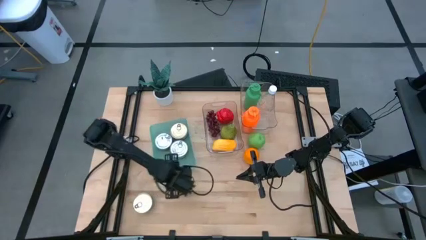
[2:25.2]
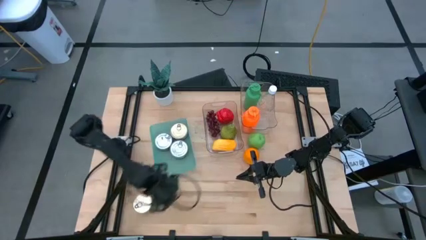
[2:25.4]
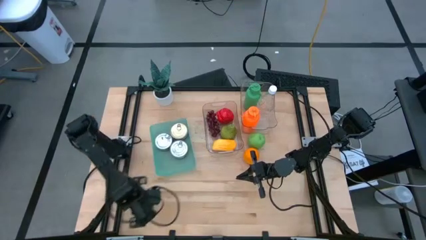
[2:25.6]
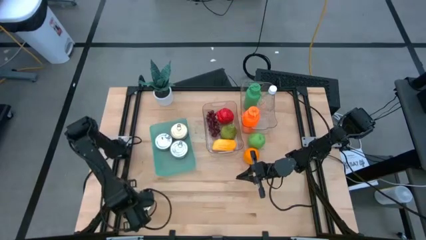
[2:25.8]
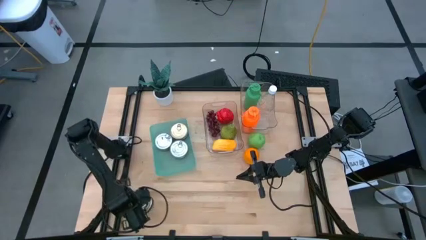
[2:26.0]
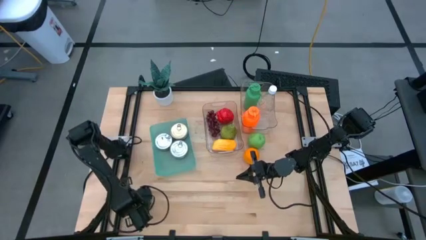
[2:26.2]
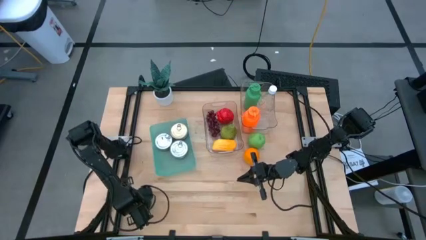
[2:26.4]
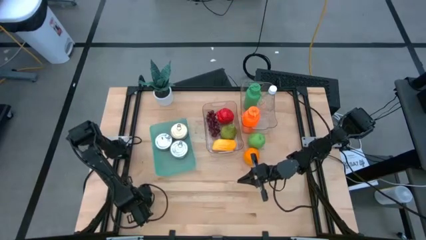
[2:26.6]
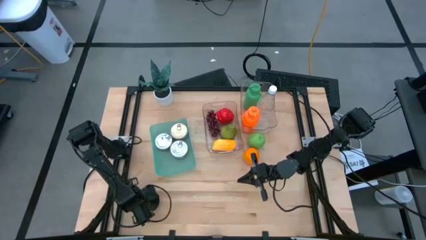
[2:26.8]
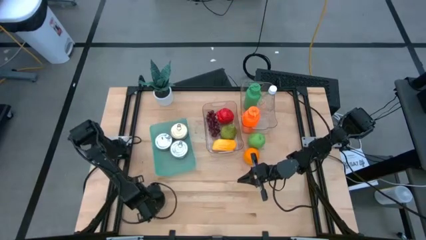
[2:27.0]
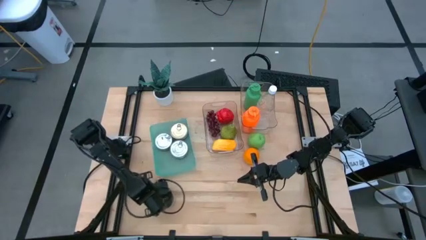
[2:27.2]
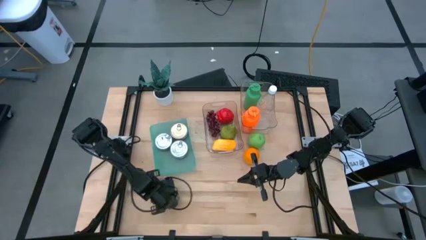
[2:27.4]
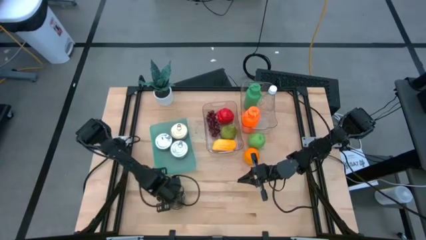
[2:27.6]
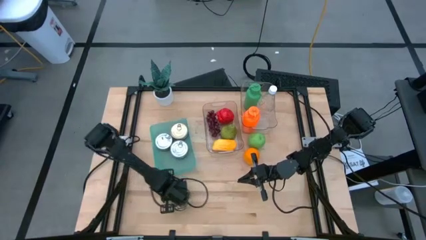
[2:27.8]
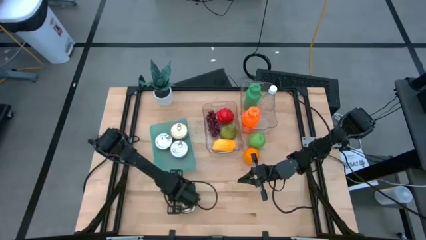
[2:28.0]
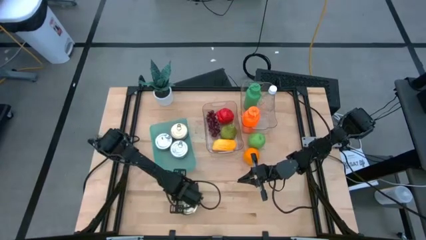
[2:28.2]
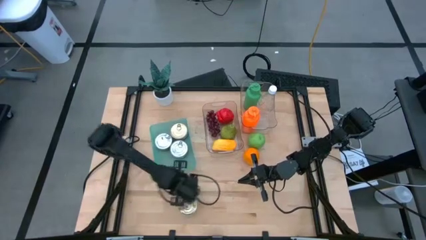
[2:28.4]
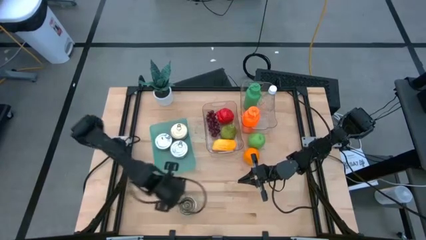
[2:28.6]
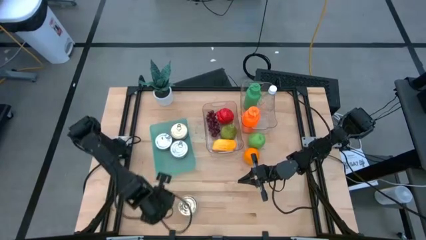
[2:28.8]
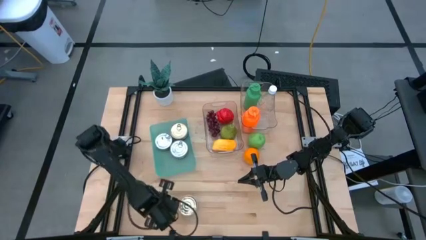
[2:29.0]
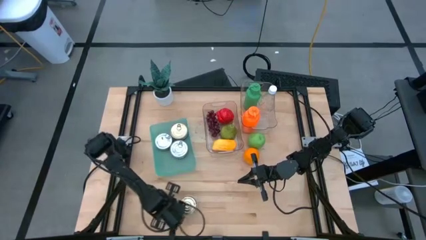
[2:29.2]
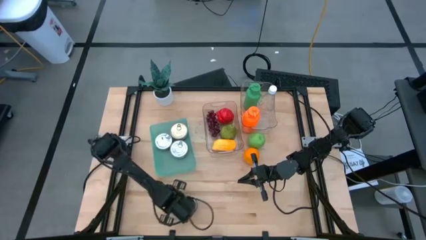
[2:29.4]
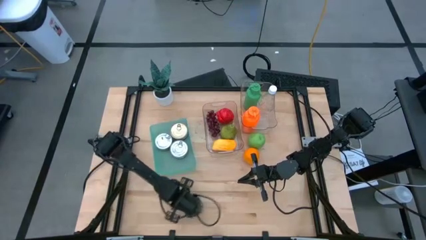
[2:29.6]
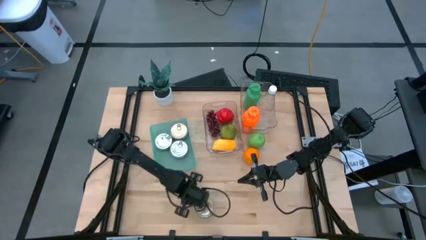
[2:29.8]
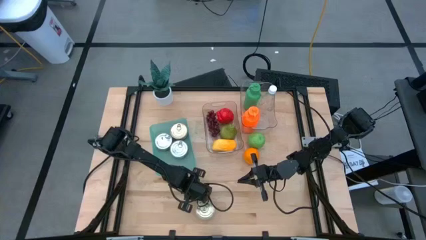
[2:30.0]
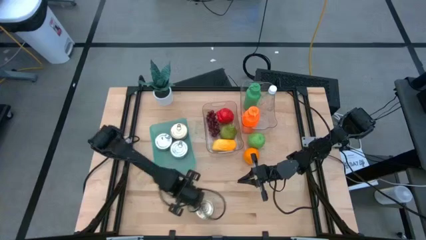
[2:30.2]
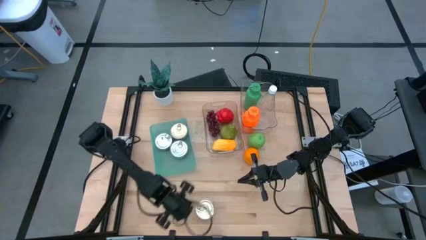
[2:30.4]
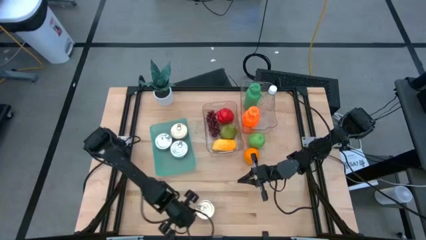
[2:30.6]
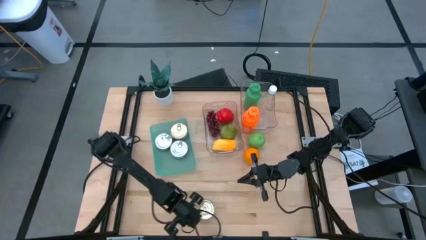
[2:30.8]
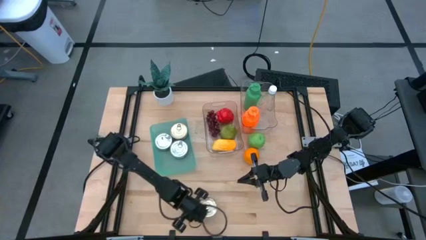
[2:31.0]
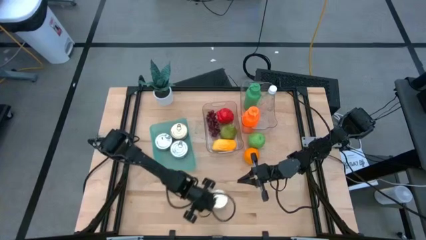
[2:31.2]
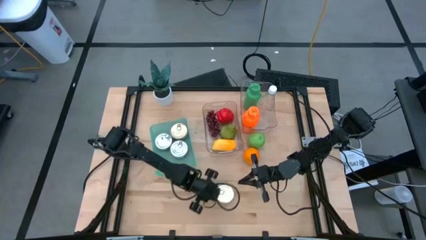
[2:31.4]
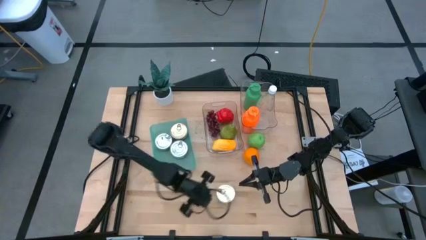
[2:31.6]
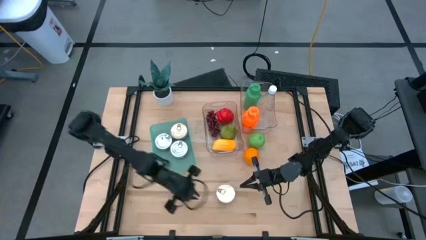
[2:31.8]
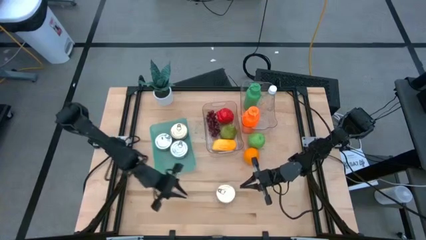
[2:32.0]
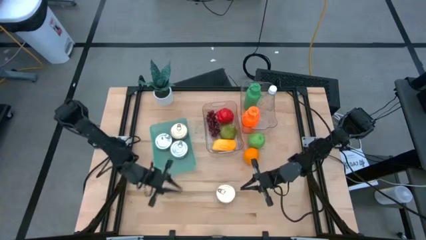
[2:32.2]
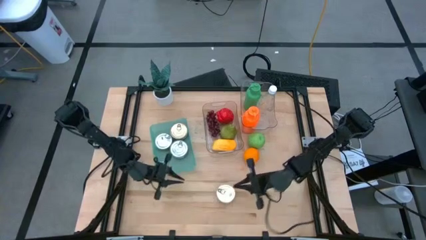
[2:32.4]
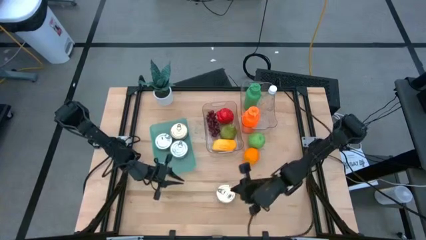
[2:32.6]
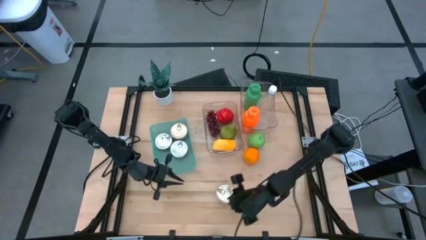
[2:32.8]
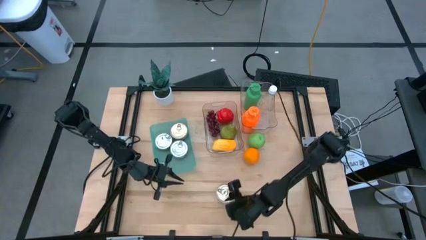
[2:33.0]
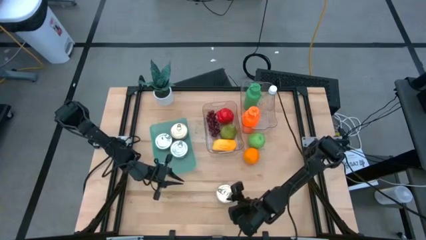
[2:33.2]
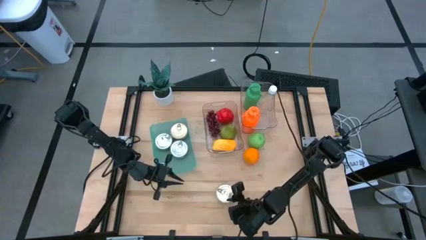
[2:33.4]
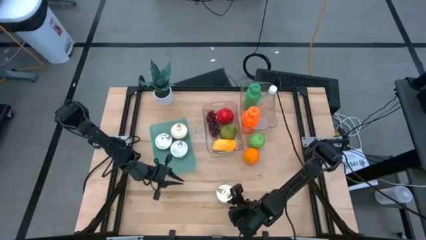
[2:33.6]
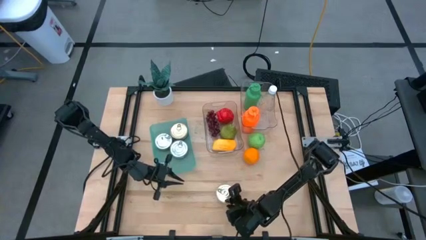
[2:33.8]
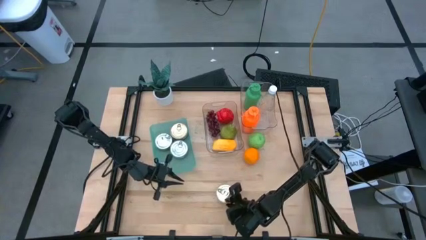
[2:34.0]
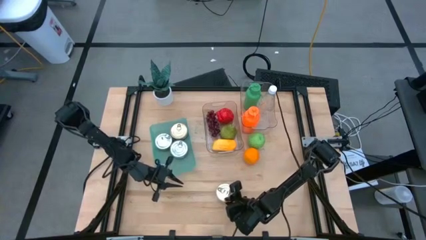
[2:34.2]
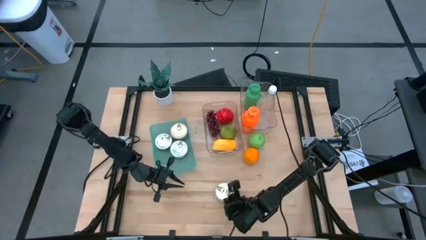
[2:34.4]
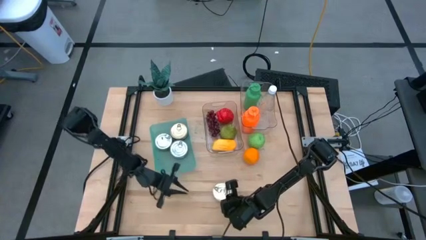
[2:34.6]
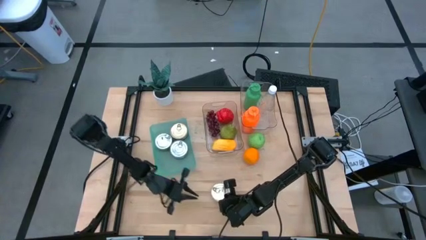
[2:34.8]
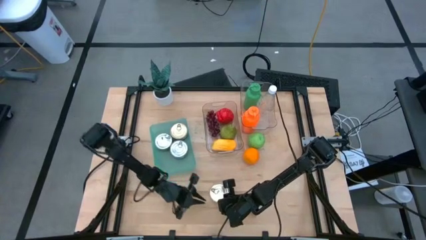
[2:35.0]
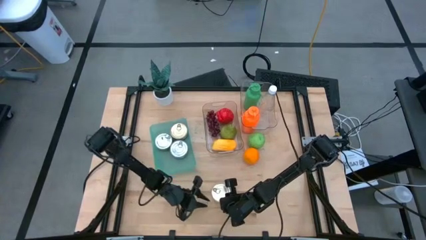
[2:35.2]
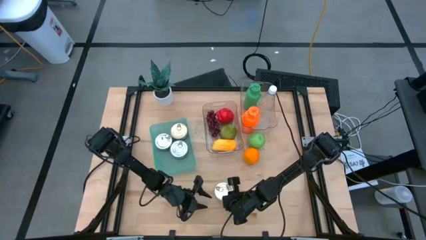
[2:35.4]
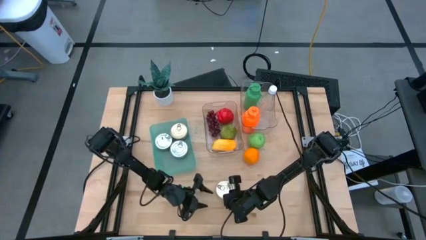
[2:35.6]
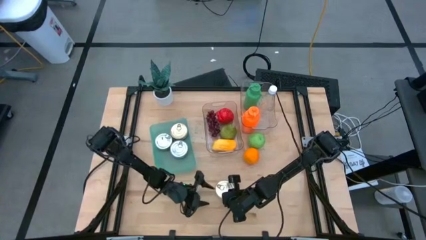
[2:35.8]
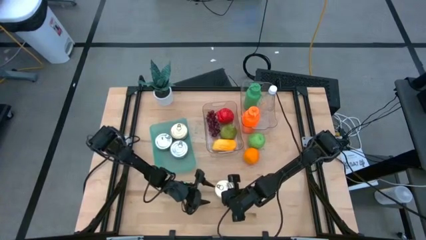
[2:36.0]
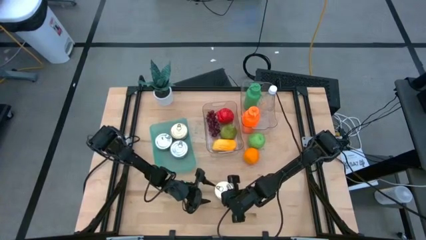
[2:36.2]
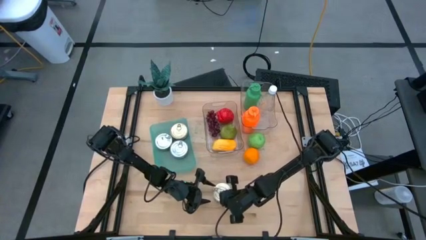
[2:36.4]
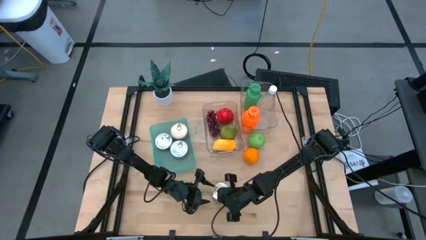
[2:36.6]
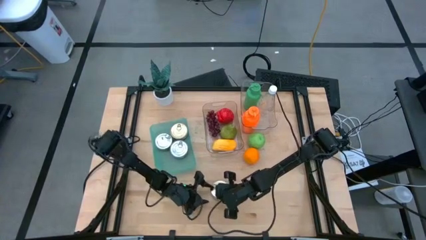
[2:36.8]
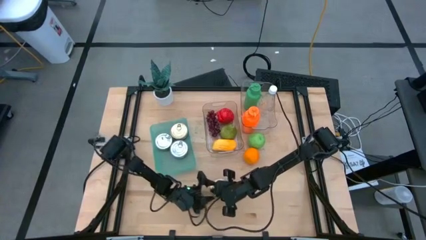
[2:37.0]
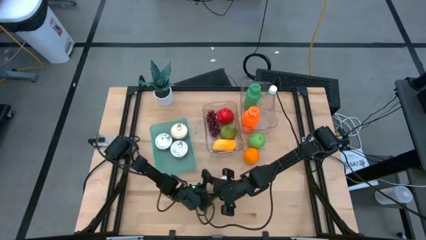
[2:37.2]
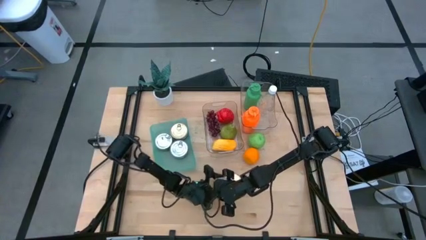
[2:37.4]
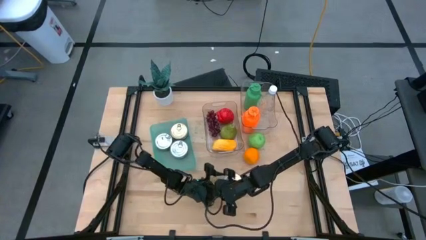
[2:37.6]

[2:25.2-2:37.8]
Task: Pick & Place Food Item
Put the blue tuna can into the green bin

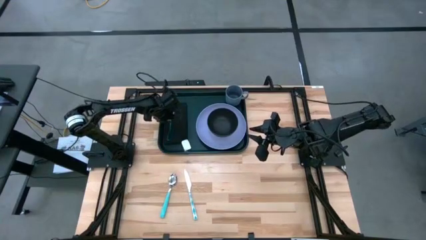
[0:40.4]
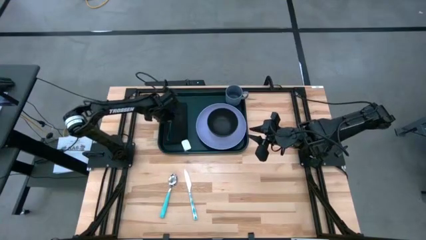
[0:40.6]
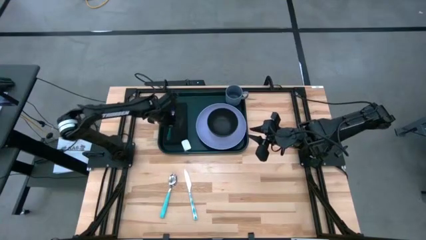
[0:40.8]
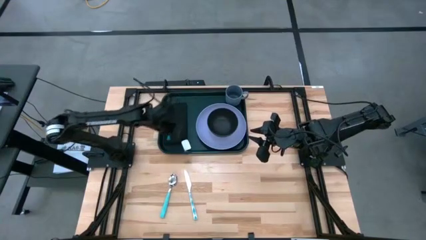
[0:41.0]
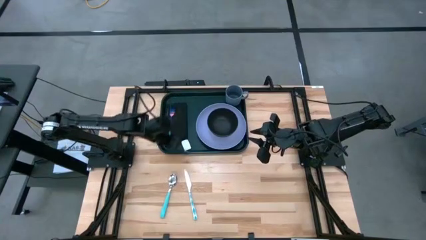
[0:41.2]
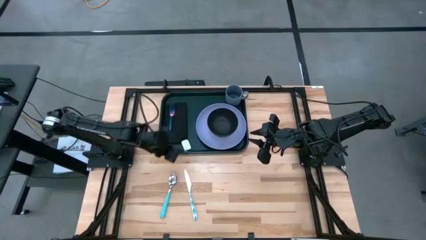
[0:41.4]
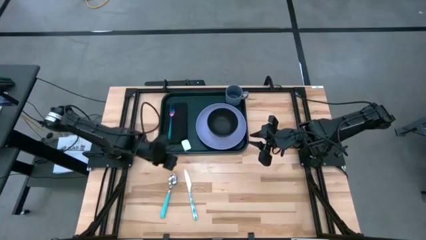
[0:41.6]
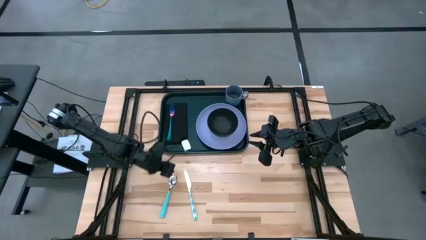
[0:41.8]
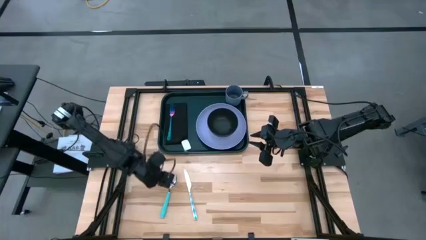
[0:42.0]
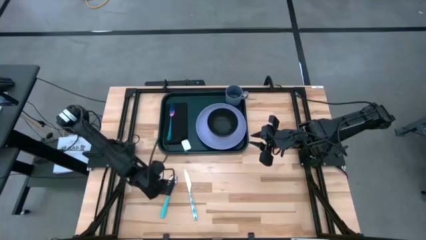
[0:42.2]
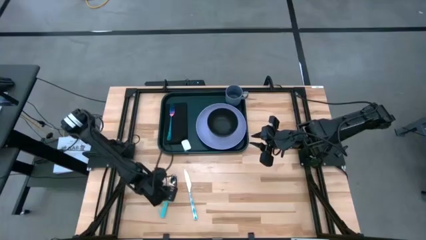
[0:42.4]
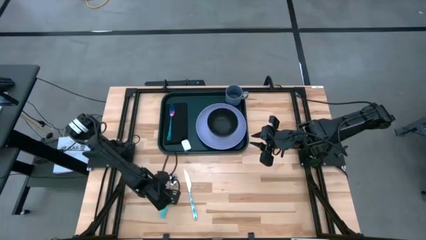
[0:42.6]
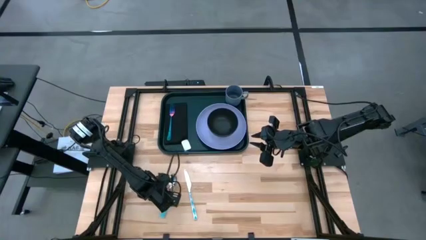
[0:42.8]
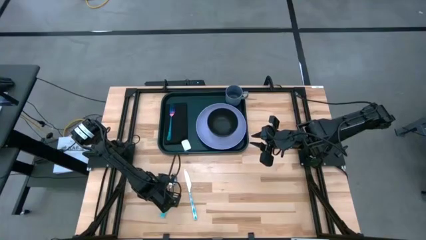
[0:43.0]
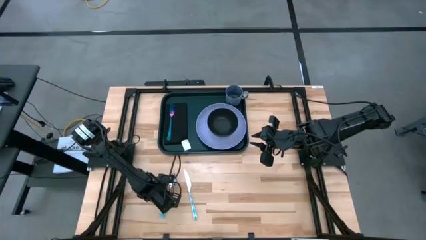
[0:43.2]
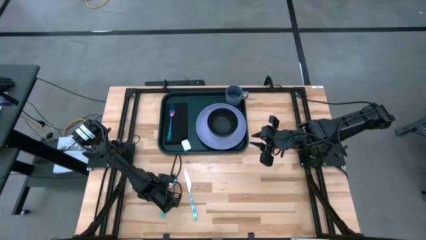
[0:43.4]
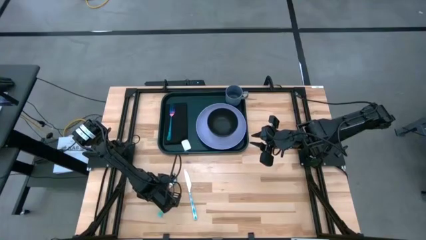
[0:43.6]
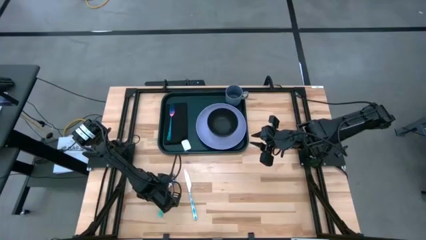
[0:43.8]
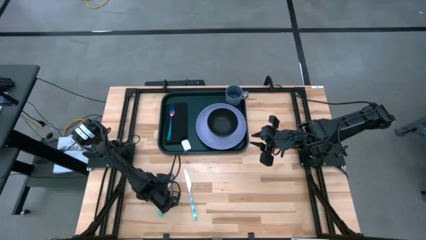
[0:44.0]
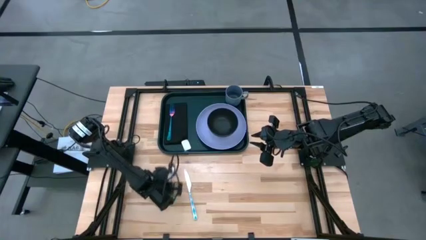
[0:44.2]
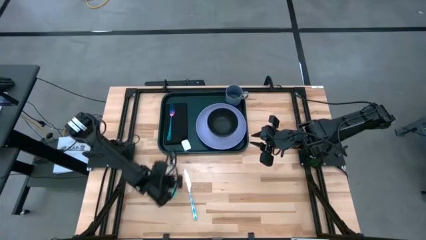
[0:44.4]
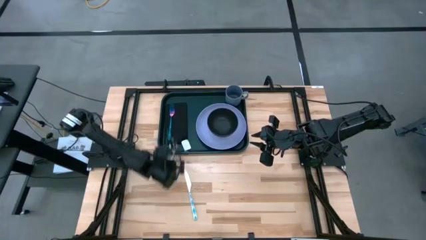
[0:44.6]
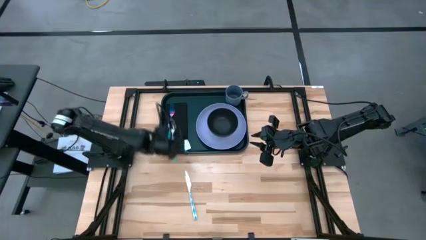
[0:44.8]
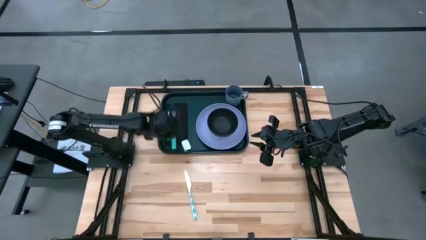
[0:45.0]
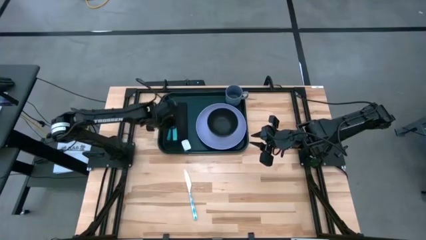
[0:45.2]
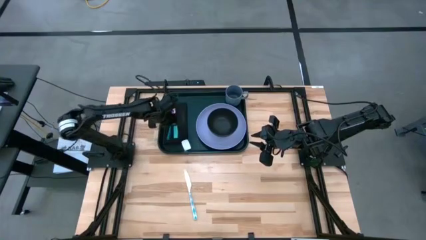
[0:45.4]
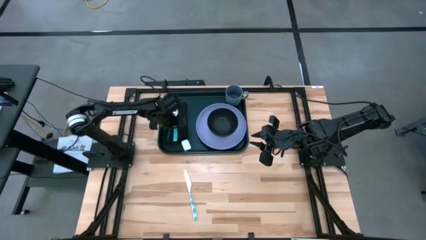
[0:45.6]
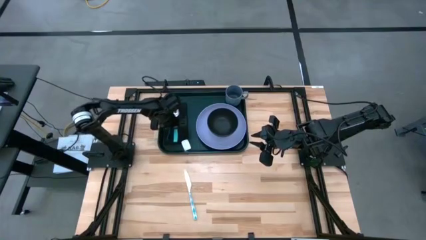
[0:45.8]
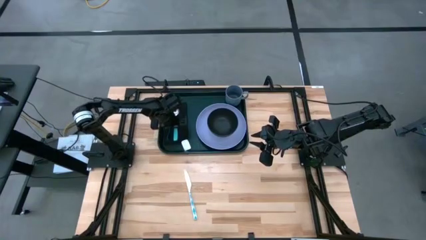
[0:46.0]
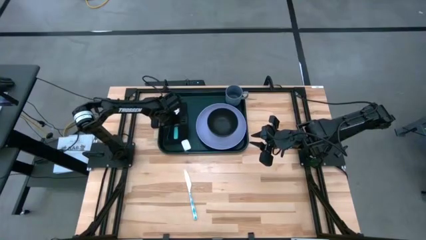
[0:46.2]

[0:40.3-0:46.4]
Task: Set up tray
Put the blue spoon to the right of the blue fork on the black napkin
